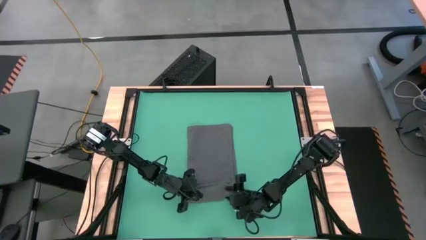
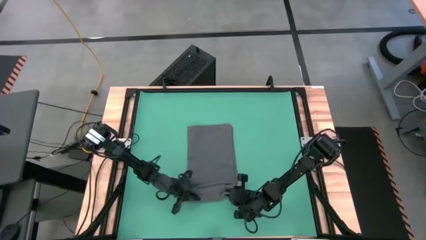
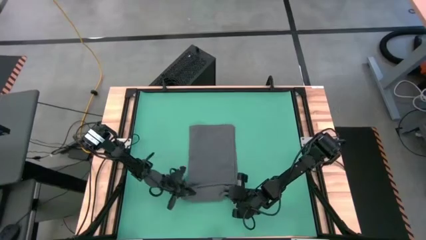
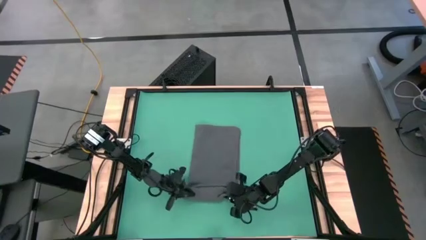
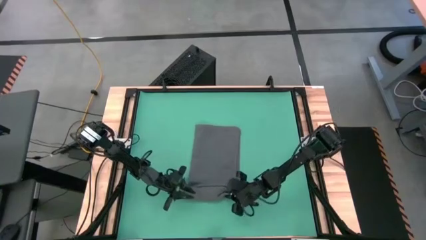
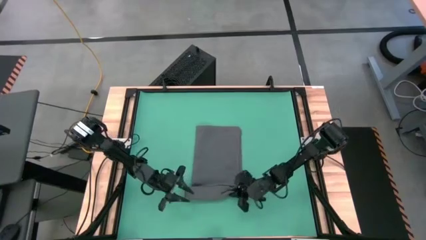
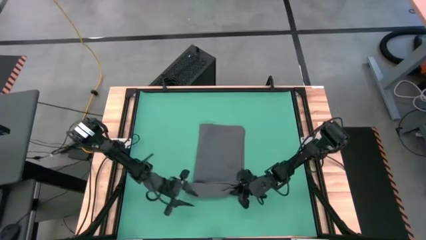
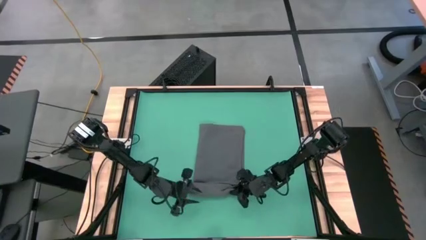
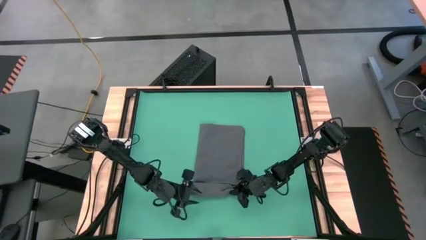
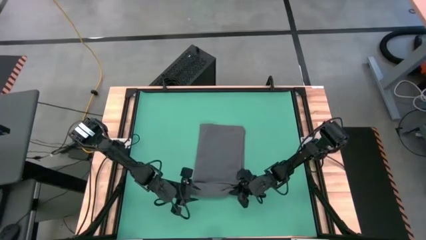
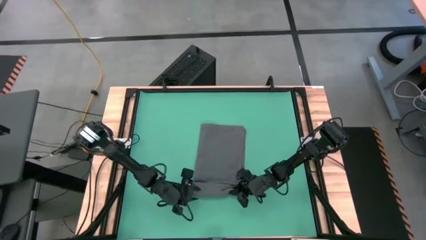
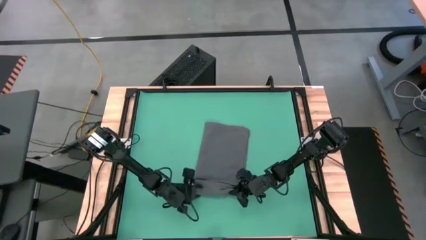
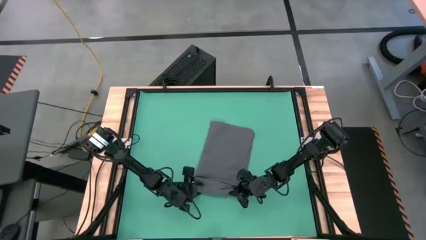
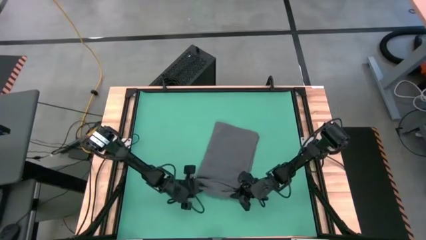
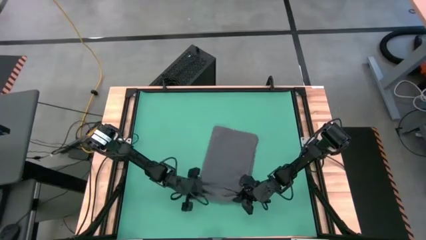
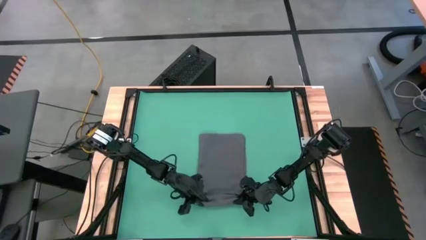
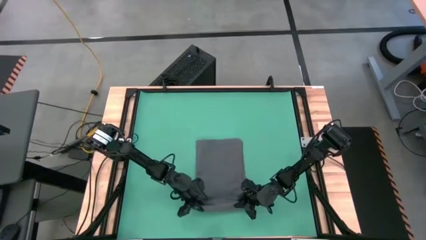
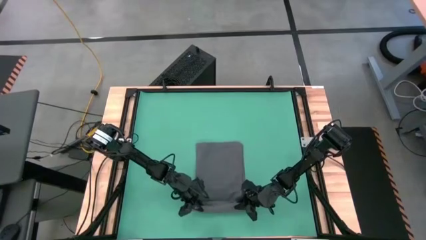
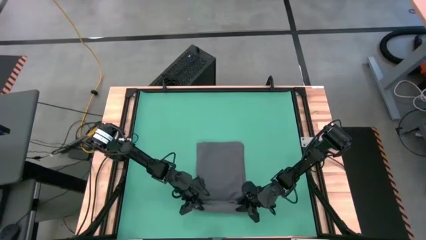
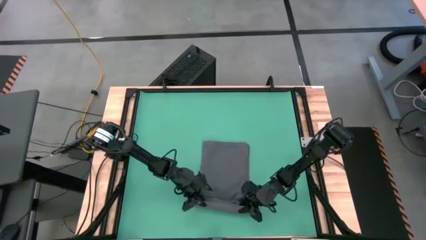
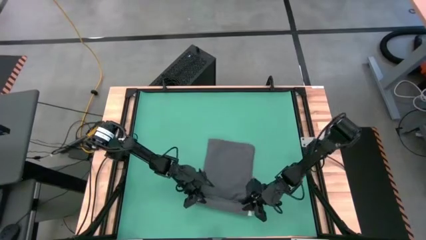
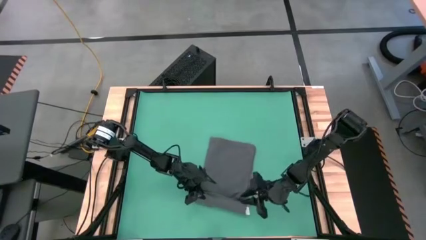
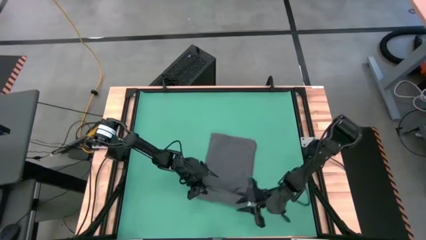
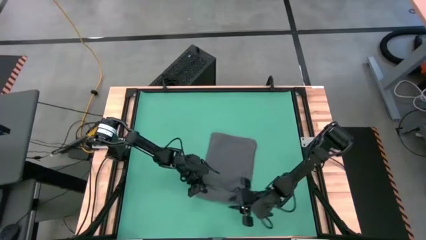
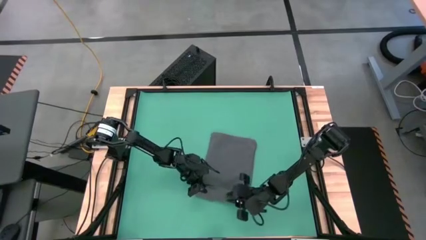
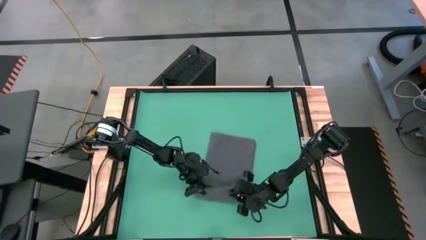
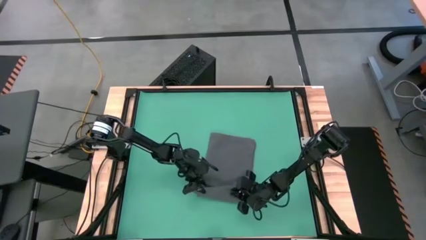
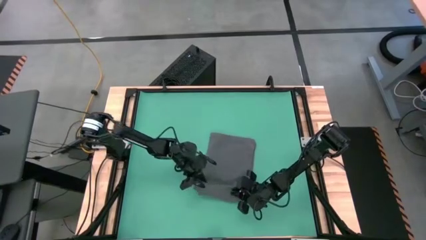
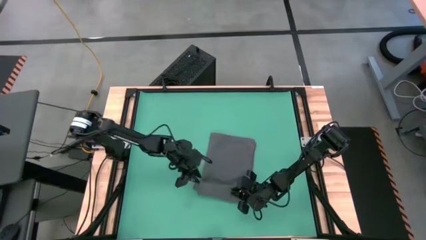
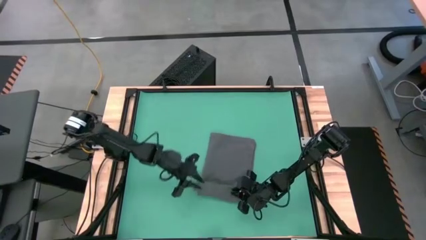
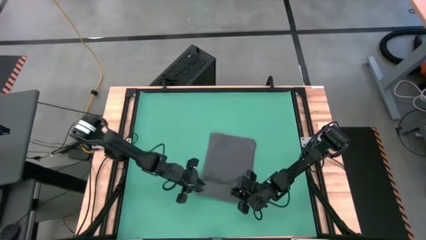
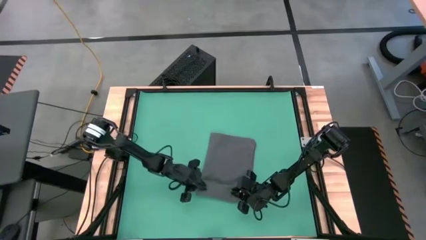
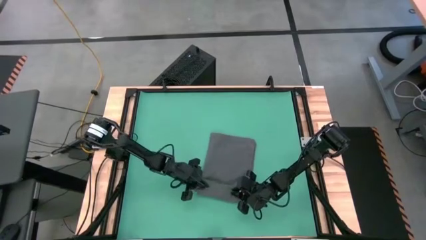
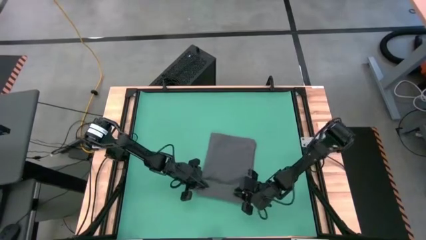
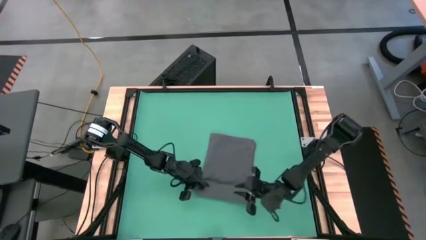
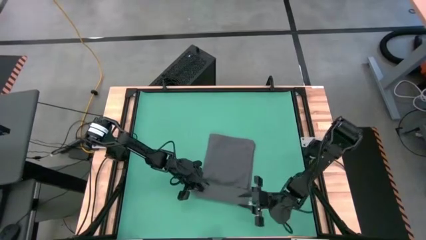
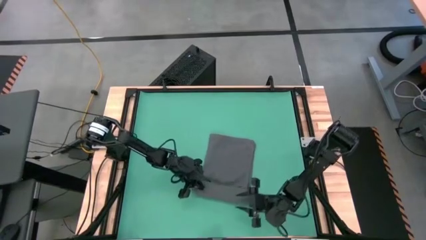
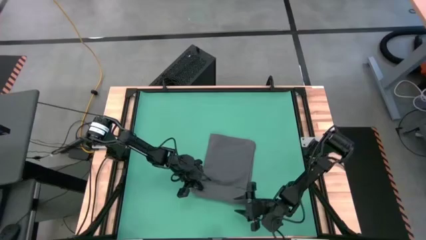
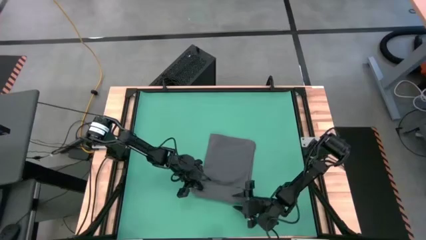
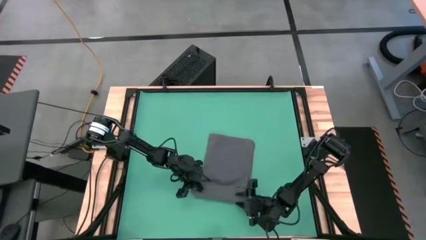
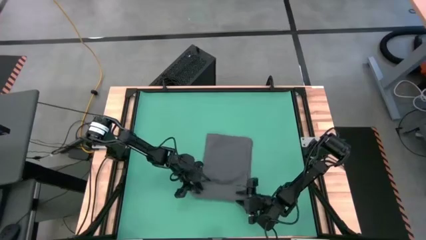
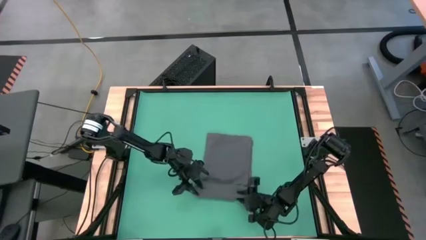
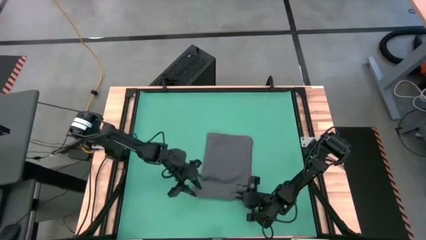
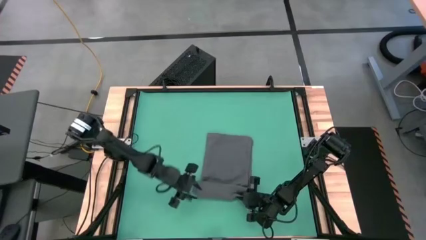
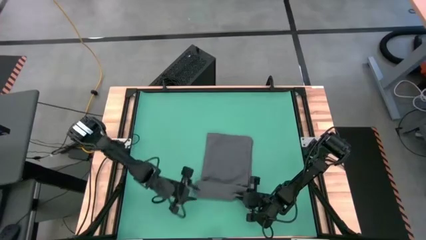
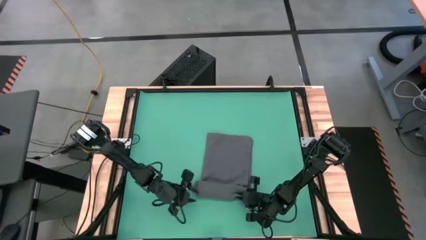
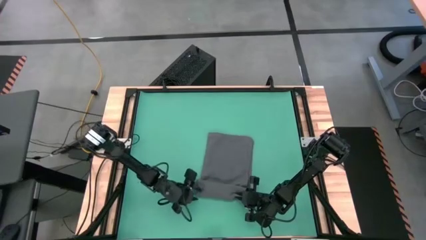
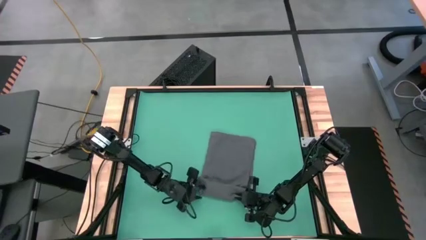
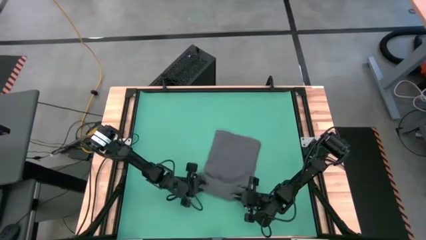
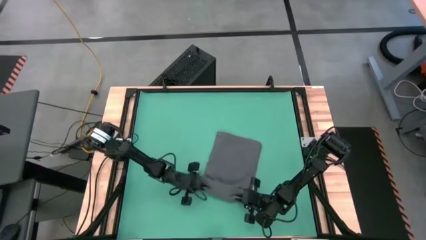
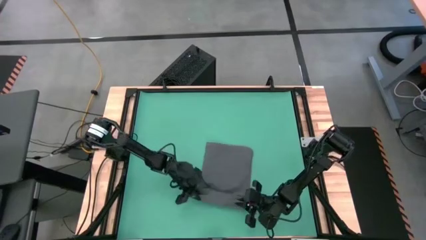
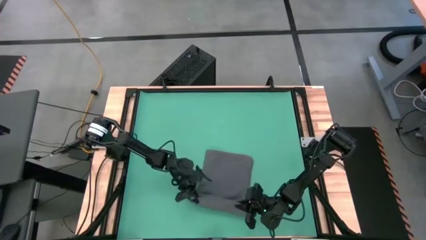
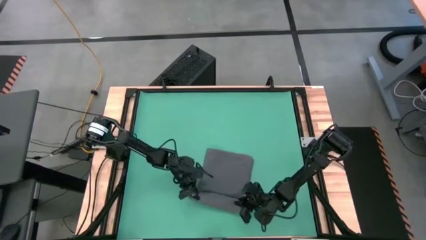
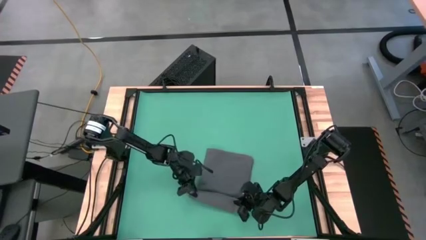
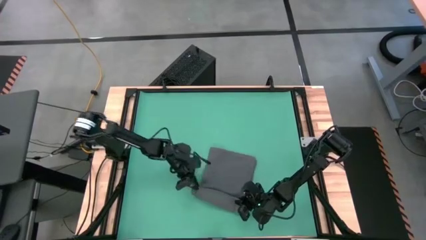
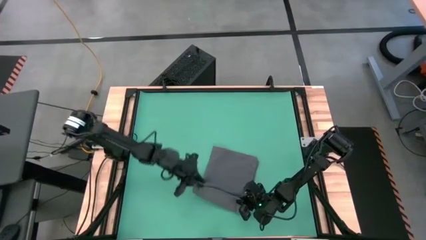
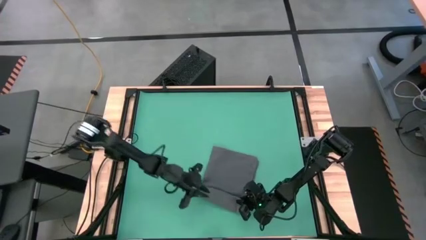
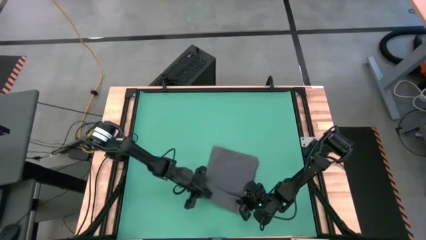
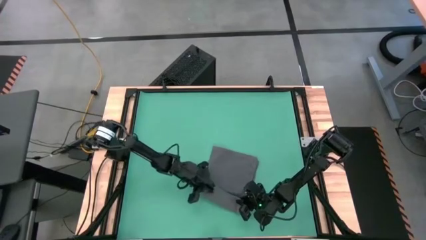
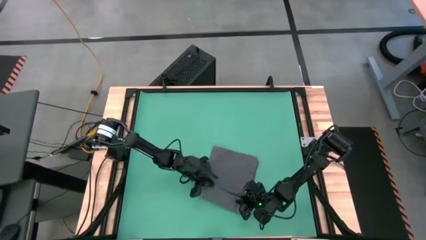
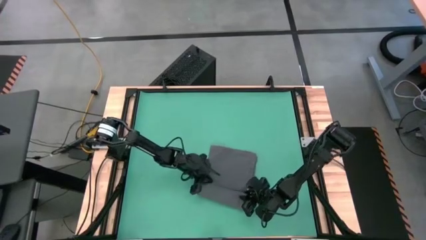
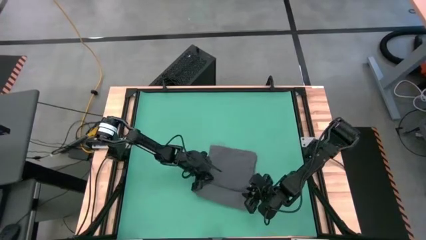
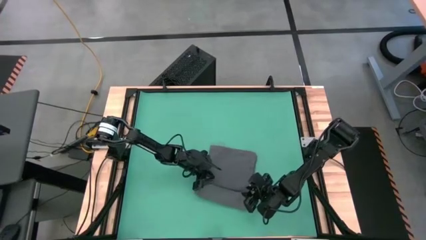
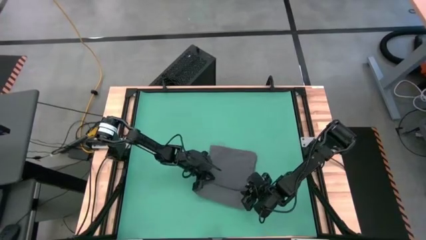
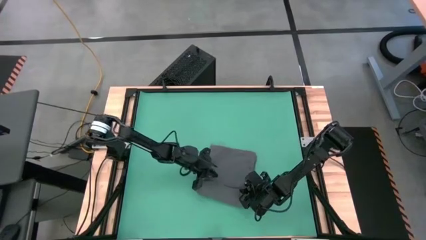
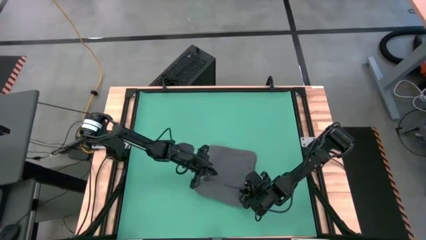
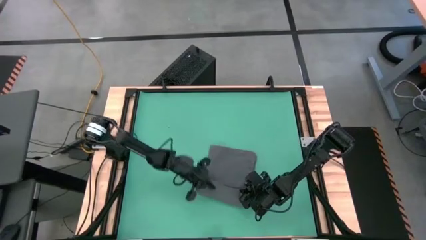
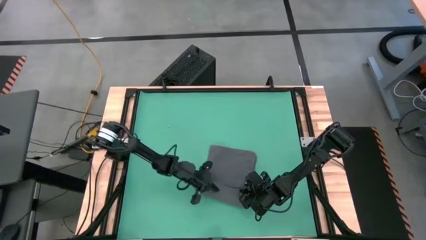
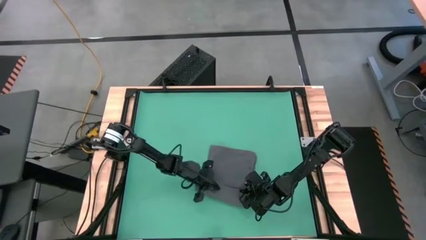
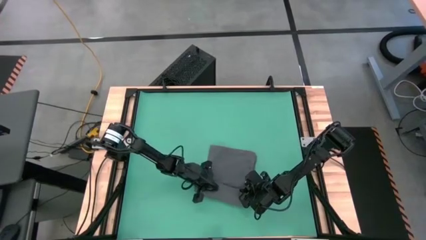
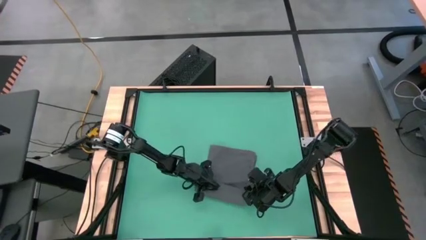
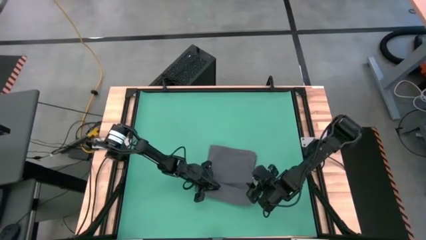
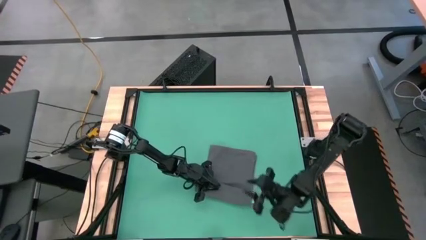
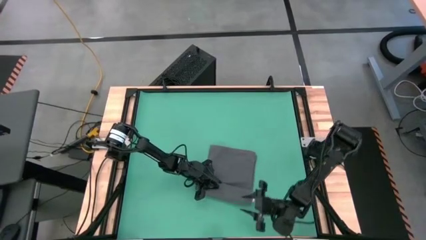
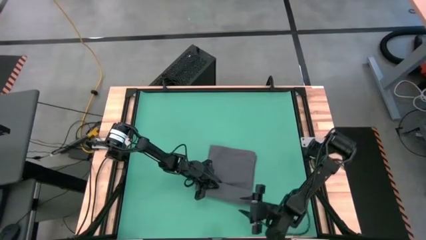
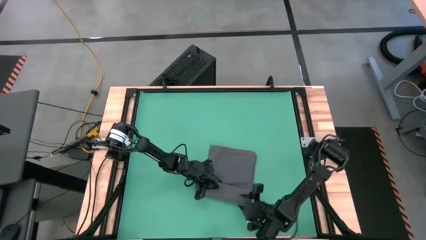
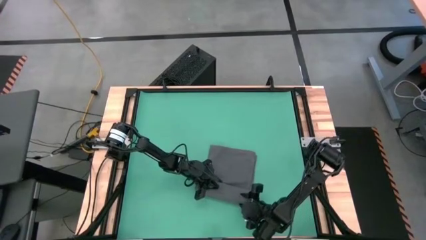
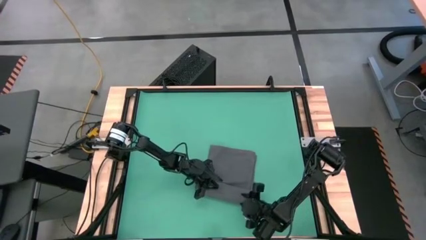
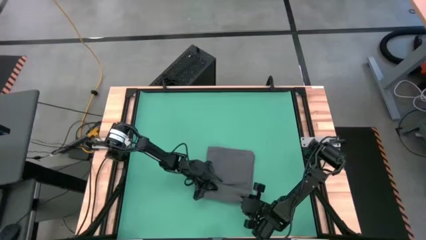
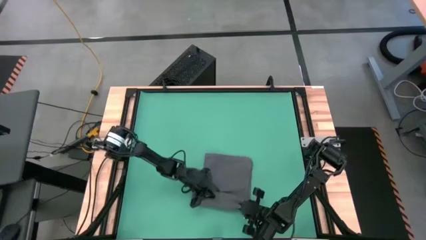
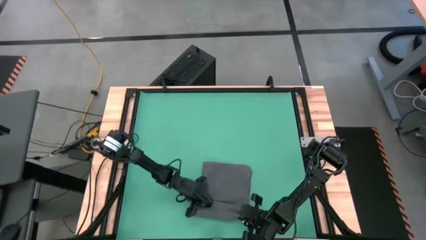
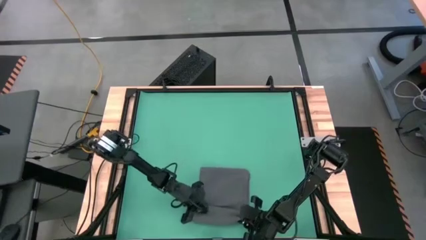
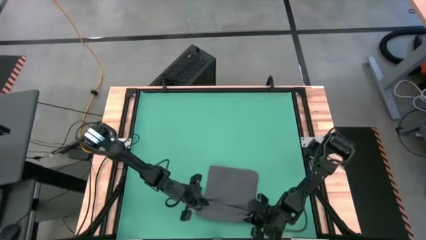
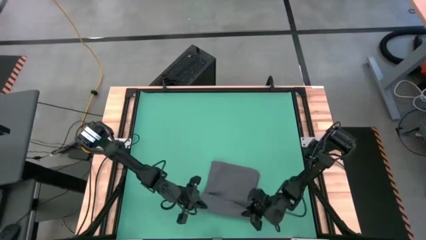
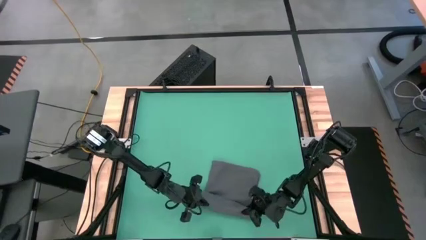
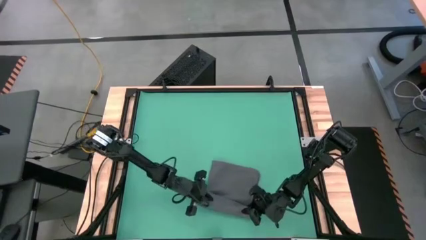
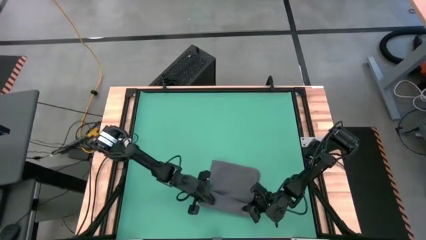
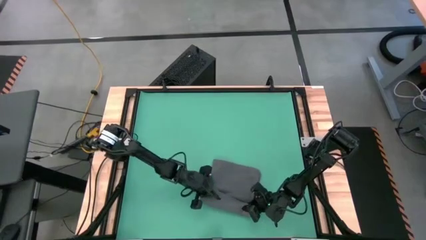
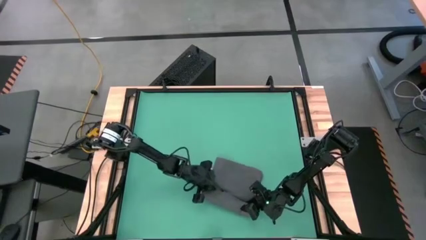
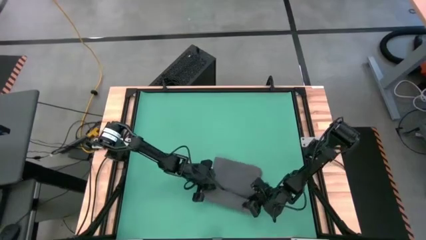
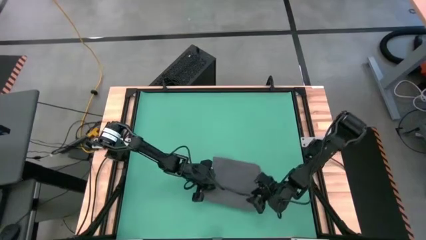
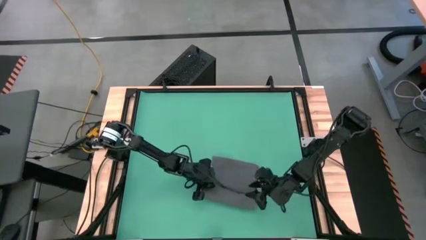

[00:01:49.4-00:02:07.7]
Task: Roll towel into tight, uniform cylinder
Roll the gray towel
